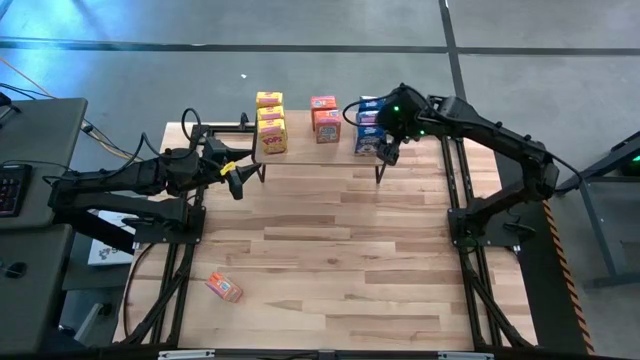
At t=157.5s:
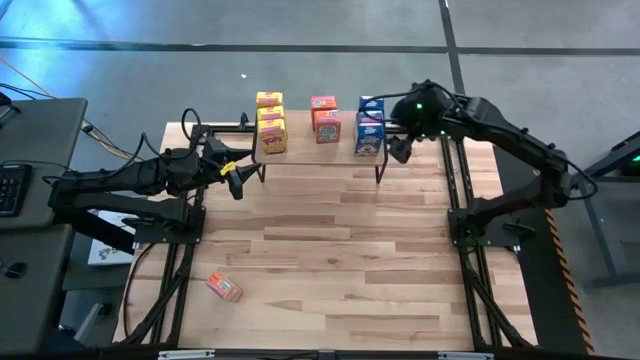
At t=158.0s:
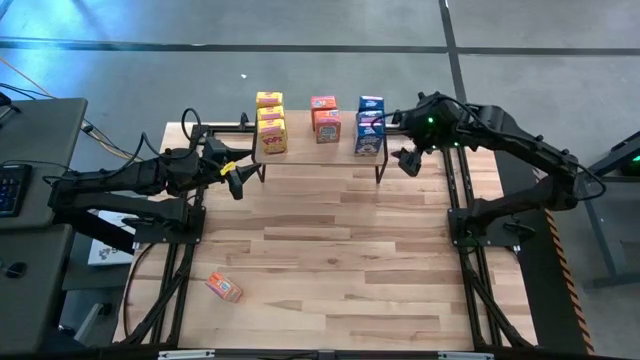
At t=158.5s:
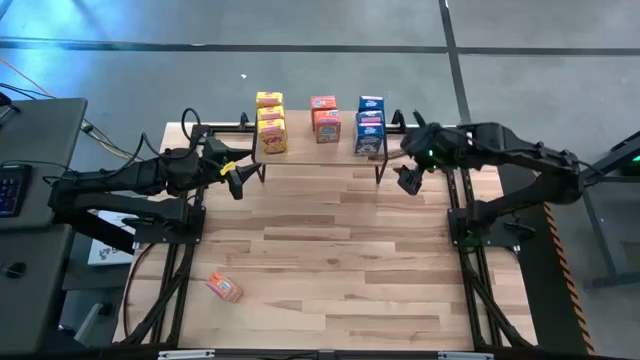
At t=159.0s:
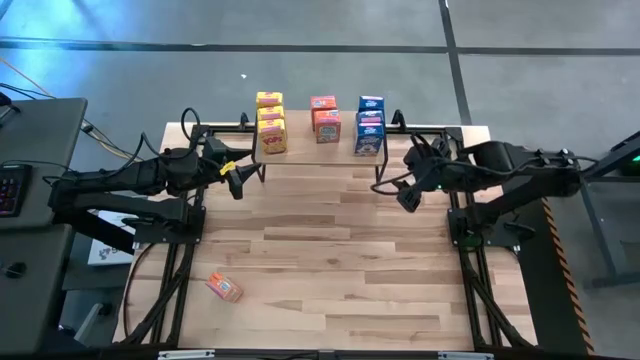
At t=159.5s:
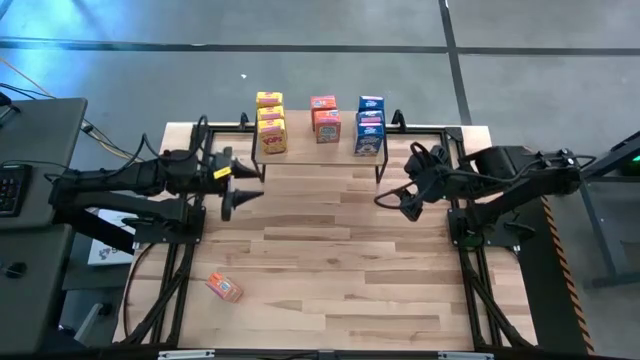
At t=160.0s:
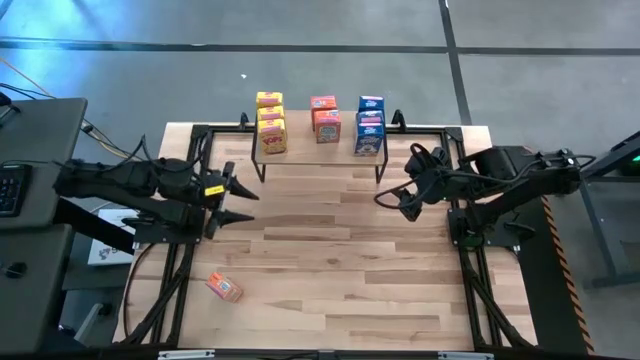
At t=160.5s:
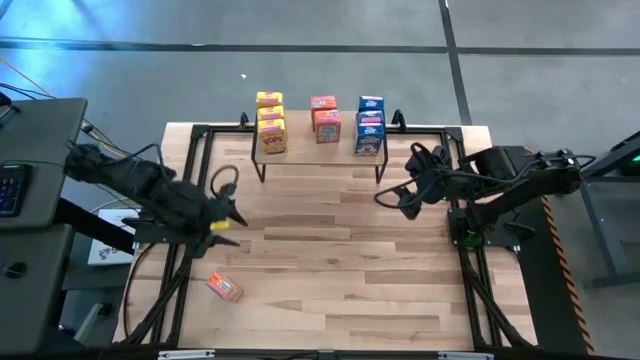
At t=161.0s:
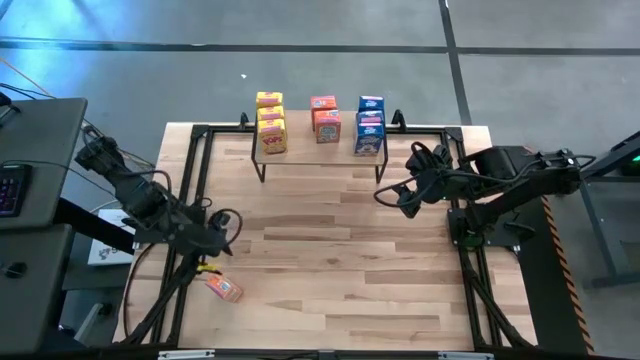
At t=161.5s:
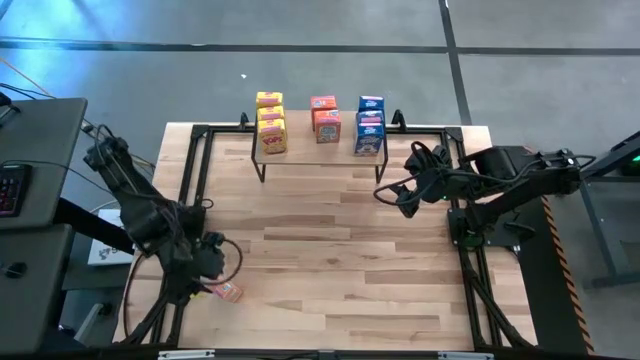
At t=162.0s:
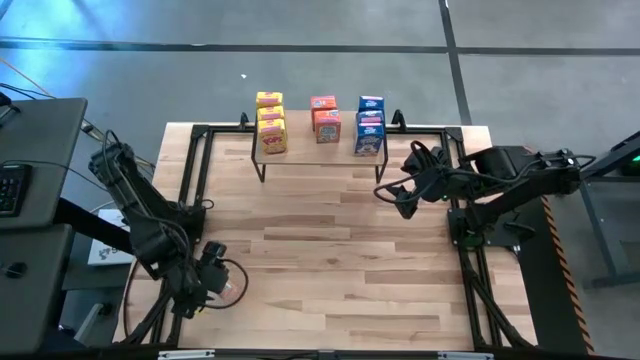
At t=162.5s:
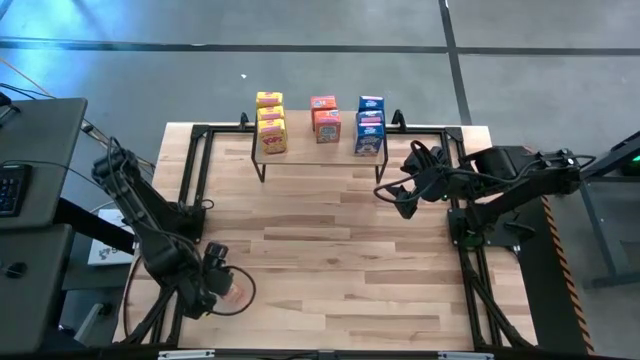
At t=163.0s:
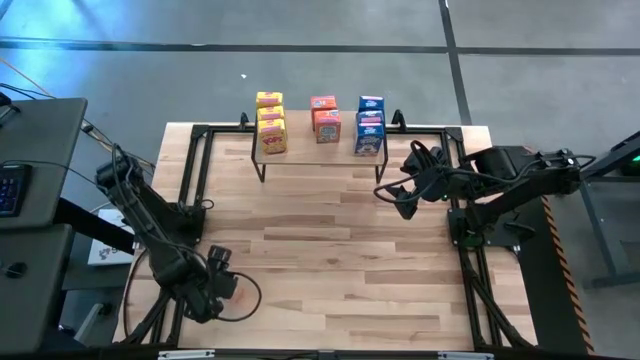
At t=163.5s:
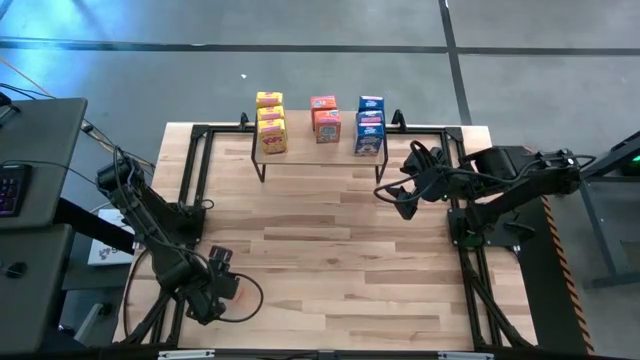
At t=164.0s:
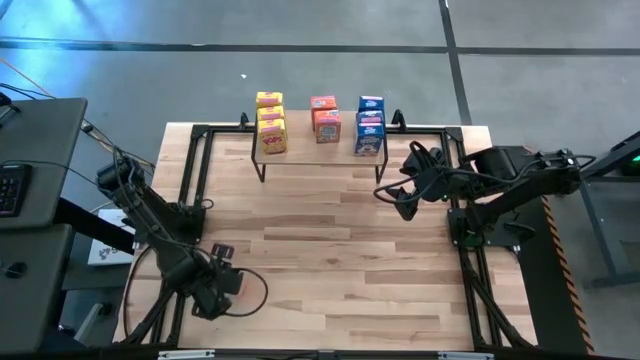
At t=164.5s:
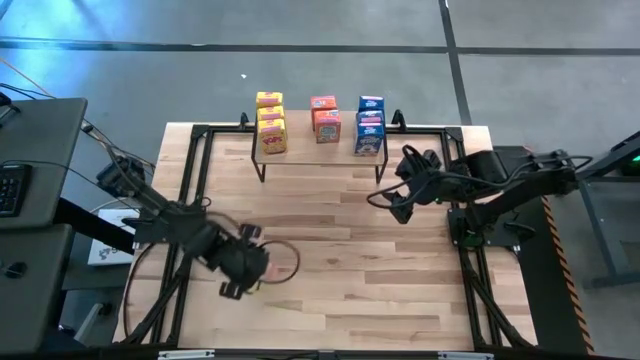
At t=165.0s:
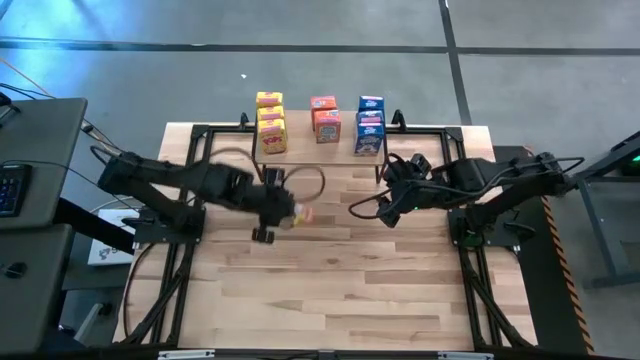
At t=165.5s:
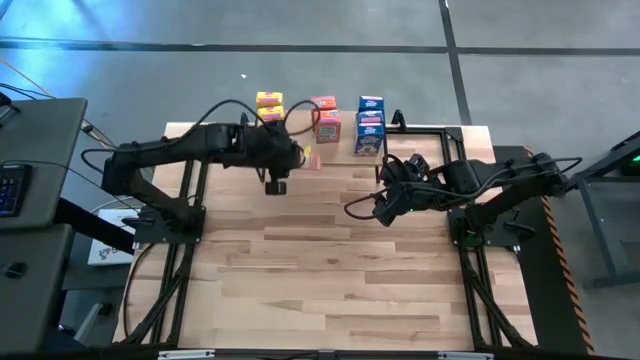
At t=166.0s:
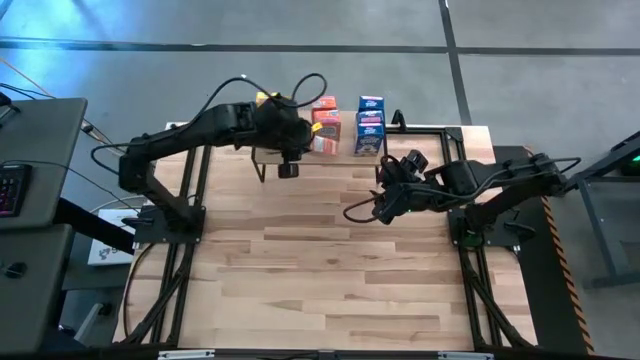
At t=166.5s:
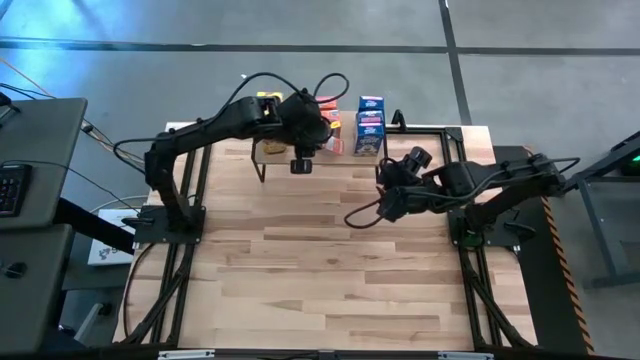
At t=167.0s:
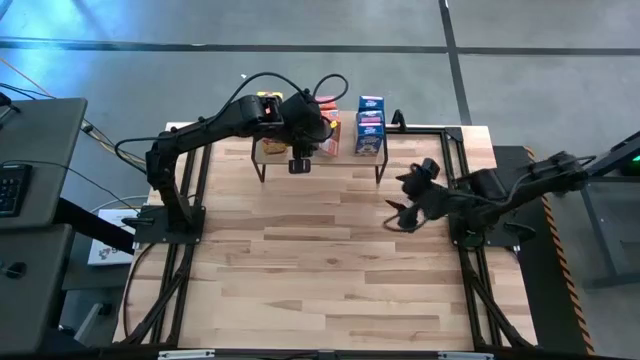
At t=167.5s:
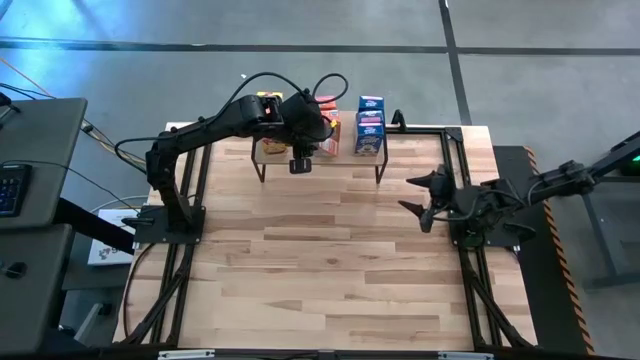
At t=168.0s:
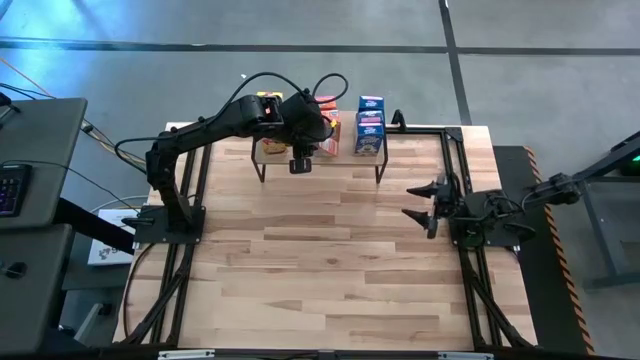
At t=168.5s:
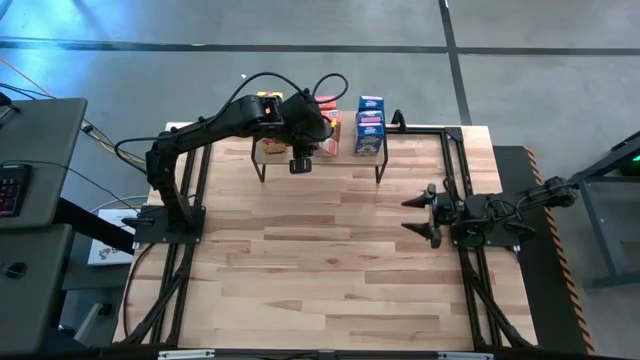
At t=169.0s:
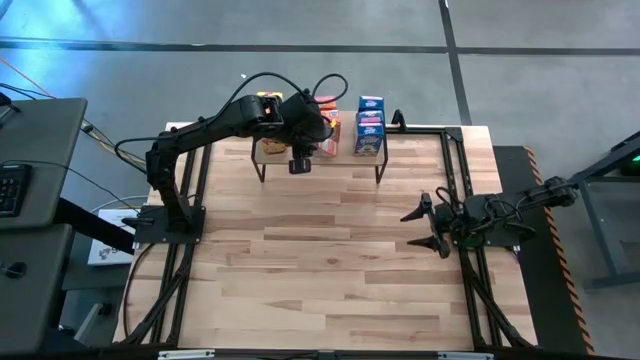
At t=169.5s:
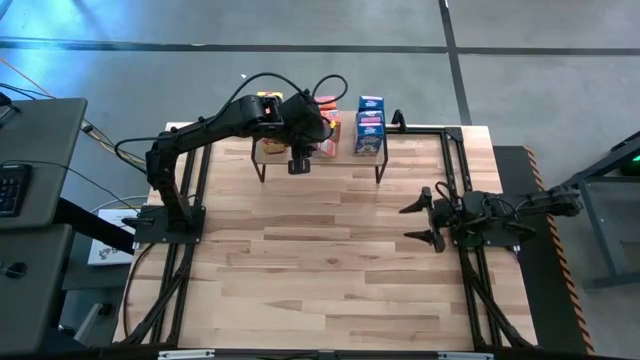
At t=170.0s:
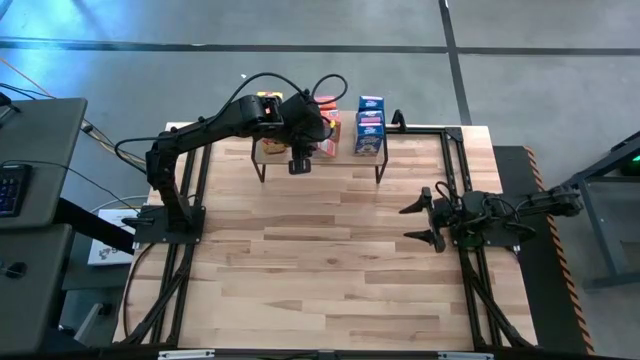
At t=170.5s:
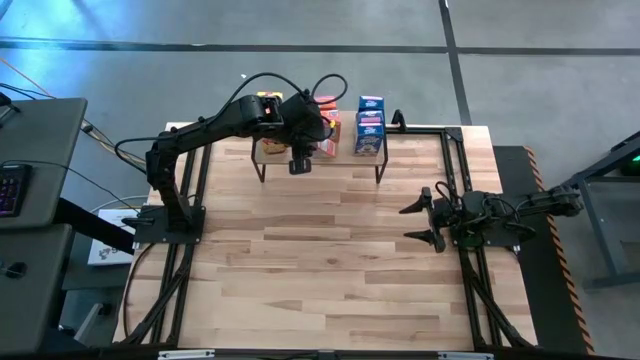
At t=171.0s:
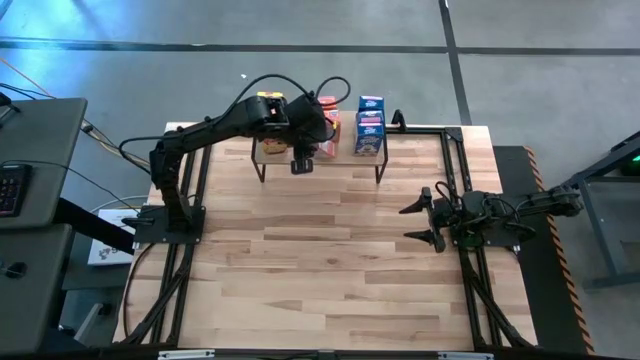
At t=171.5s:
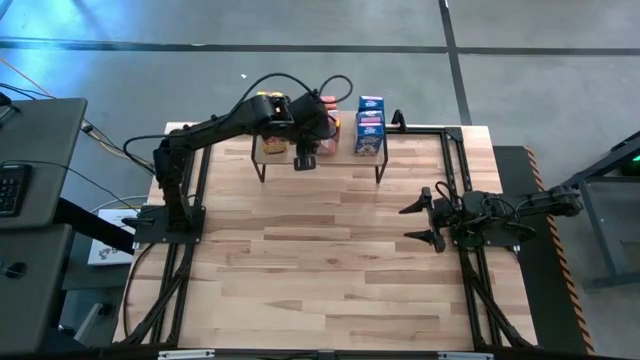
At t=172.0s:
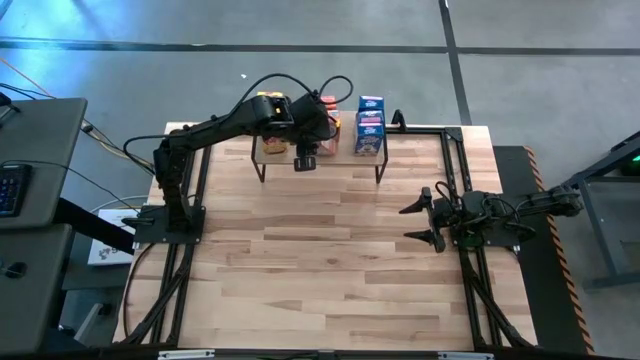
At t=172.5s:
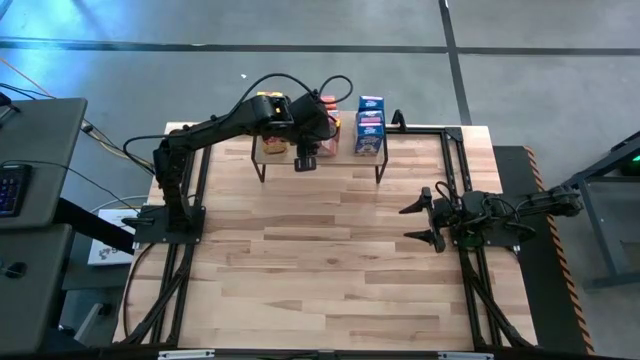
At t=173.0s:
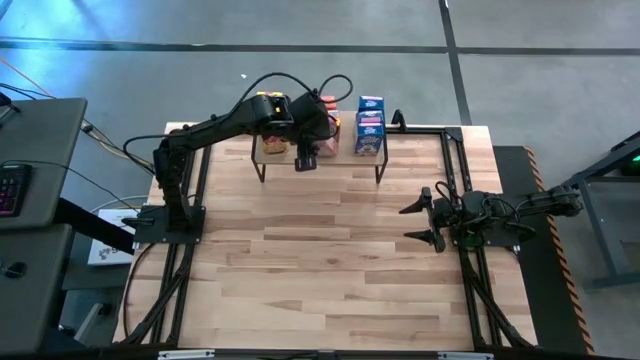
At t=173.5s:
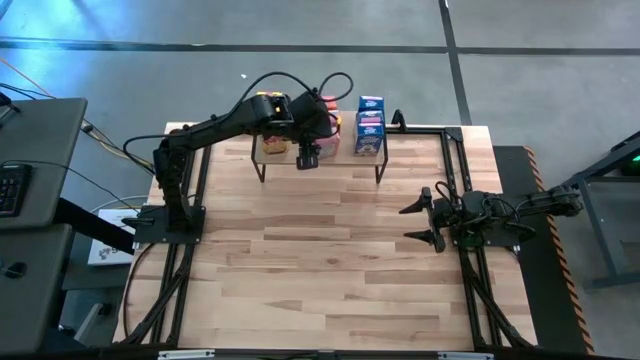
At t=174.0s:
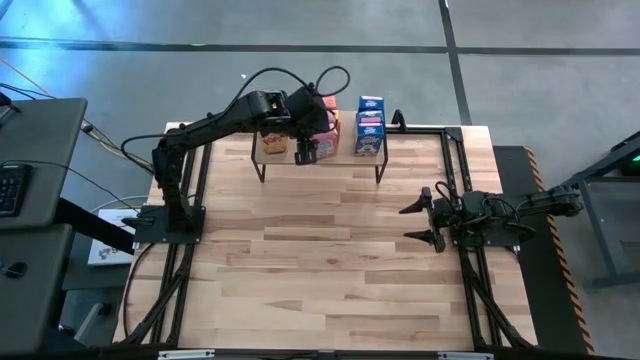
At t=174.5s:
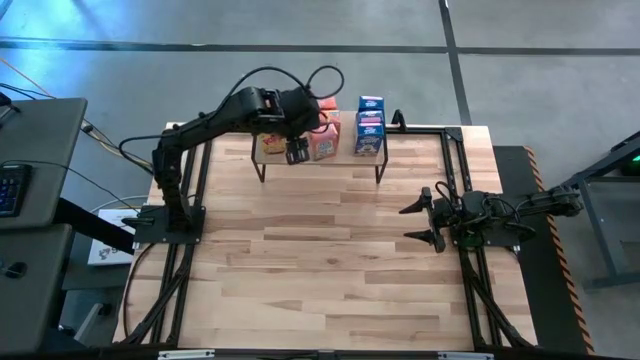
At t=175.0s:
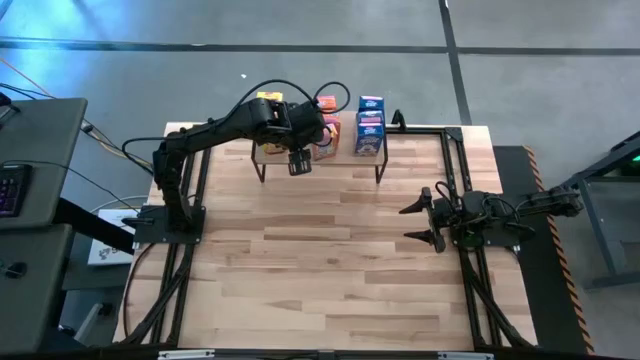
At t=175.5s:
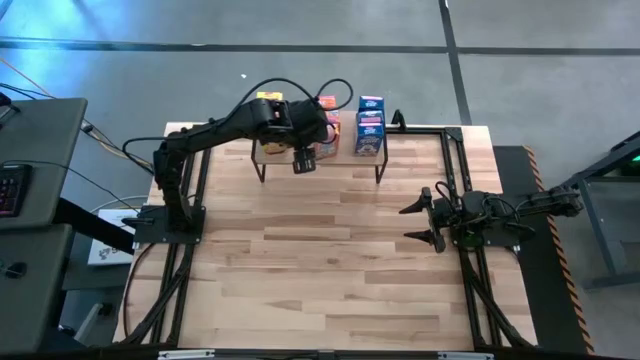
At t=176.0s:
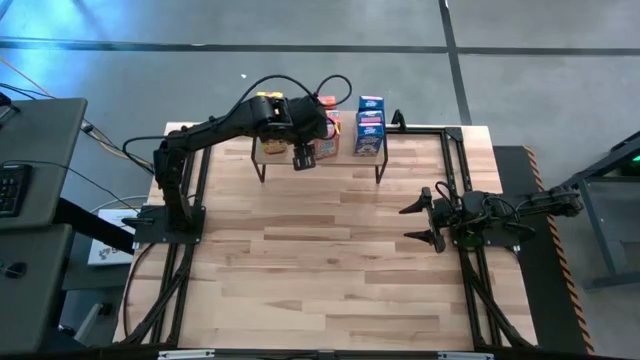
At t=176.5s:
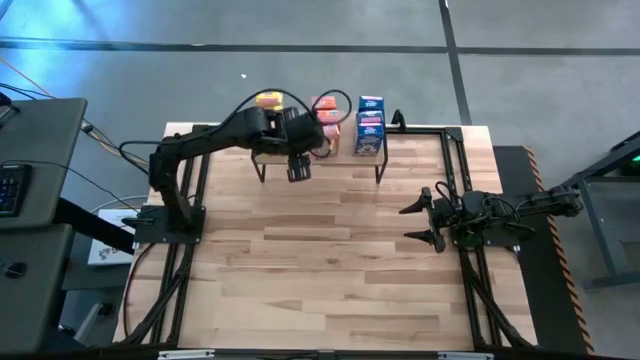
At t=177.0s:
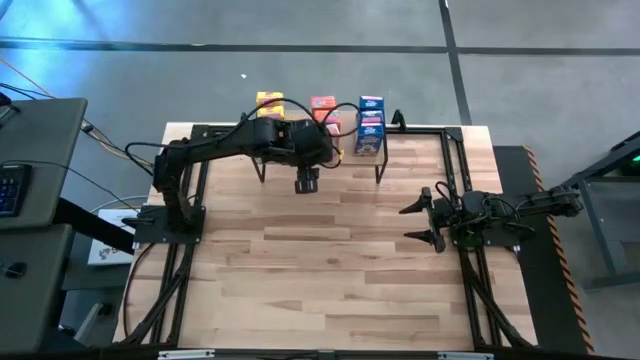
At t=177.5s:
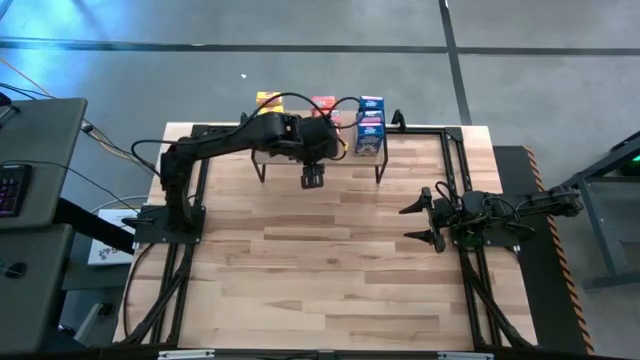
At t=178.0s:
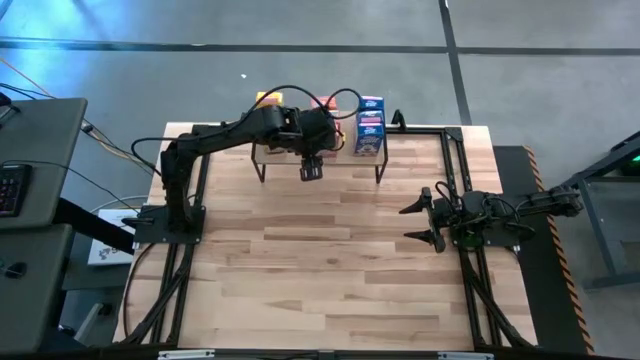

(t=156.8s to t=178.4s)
Task: Stack cereal on shelf
Put the orange cereal box aligned with the other orange cereal box on the shelf
